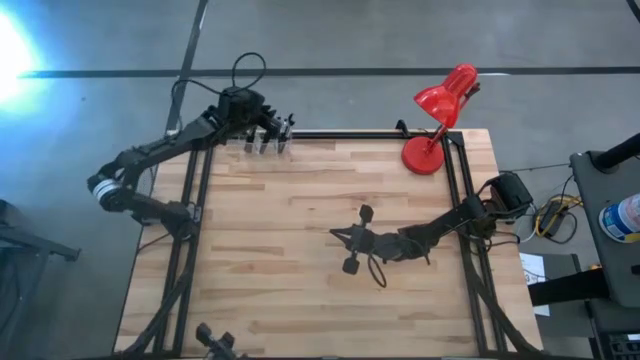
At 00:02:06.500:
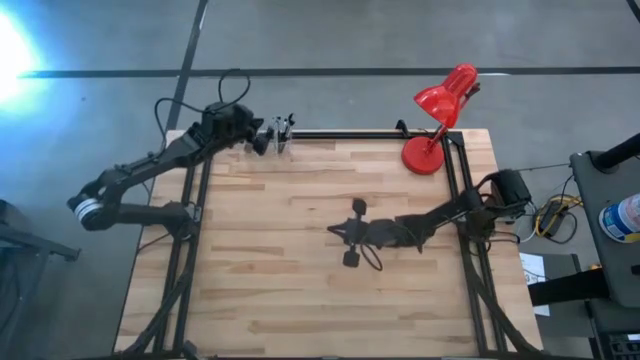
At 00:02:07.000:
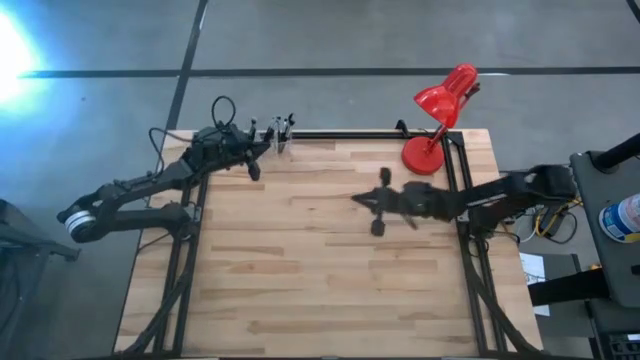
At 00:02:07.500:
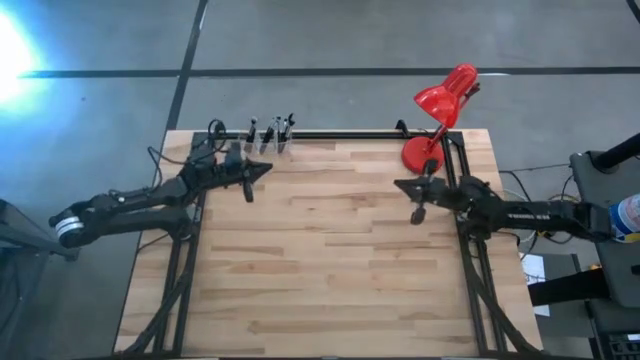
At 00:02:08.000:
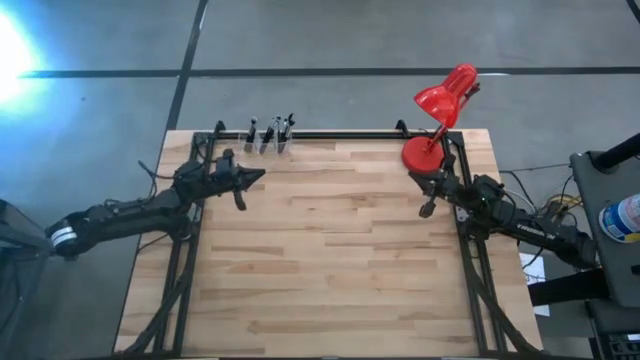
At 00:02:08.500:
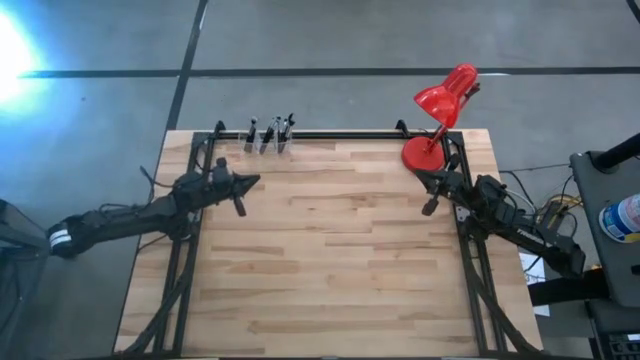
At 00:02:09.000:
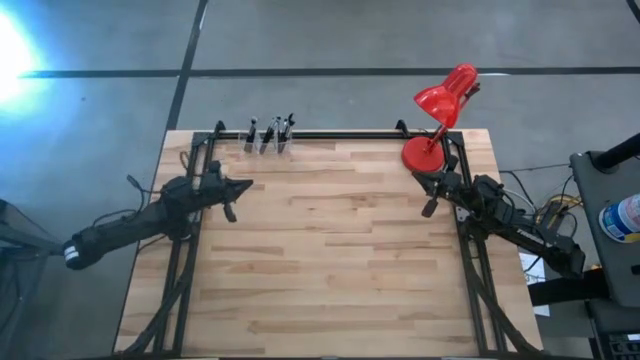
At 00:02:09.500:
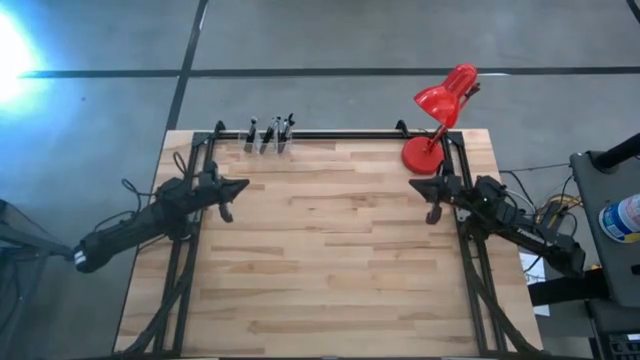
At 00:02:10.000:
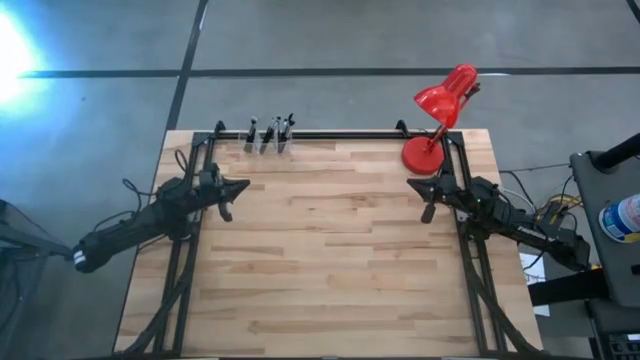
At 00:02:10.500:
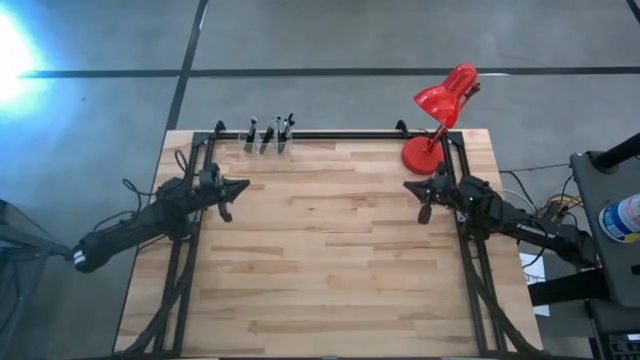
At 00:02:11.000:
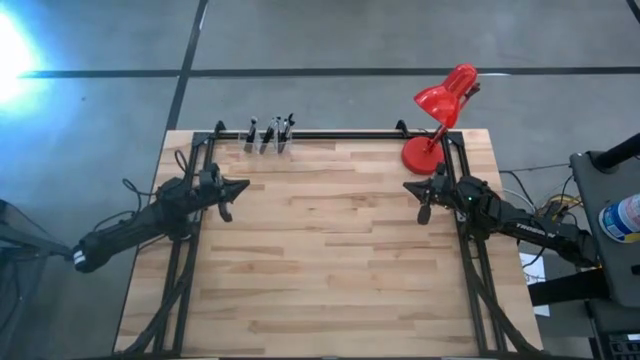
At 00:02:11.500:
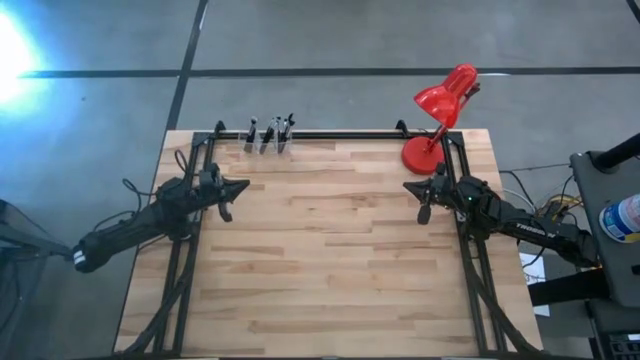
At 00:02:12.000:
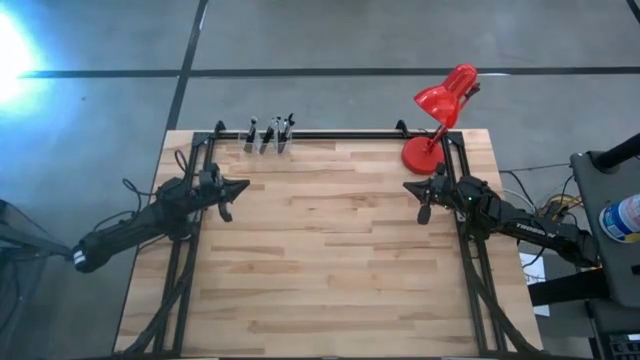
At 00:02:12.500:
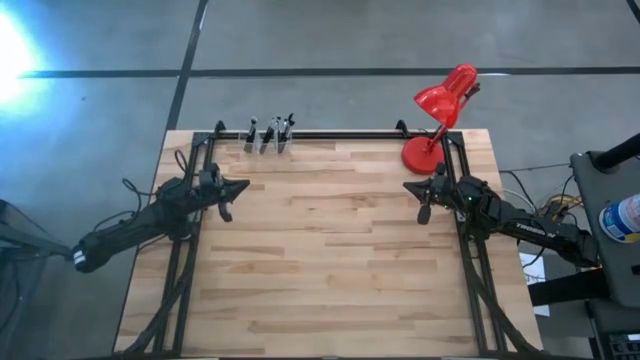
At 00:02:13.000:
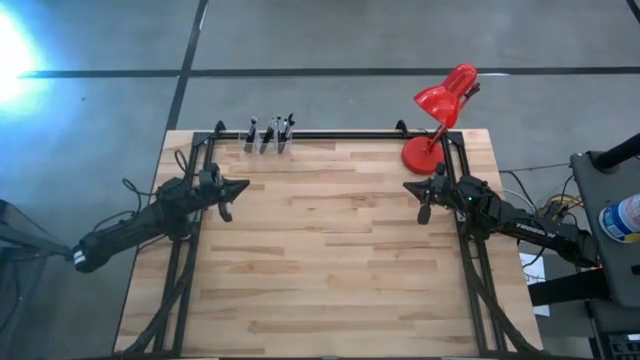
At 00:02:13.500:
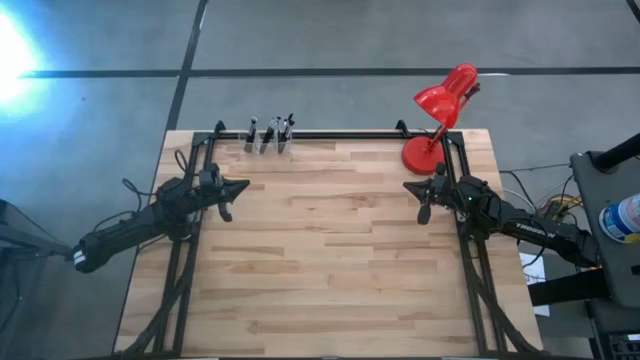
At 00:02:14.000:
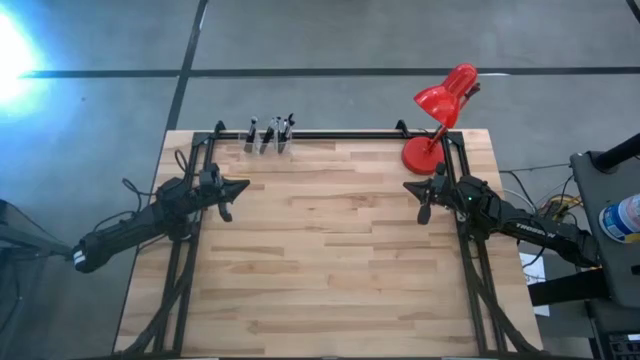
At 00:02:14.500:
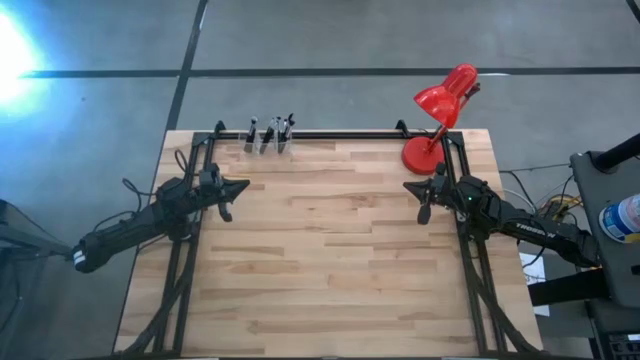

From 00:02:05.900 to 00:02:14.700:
Task: Put items in baskets/containers
Return to Home Position

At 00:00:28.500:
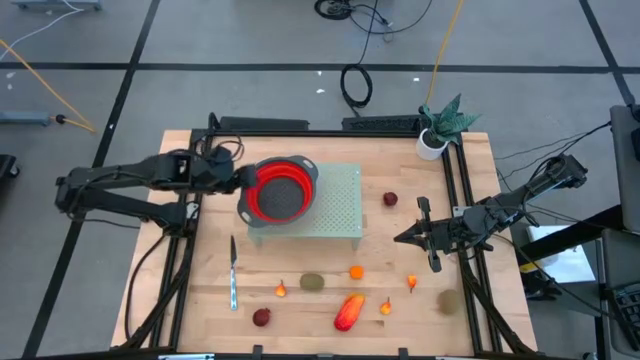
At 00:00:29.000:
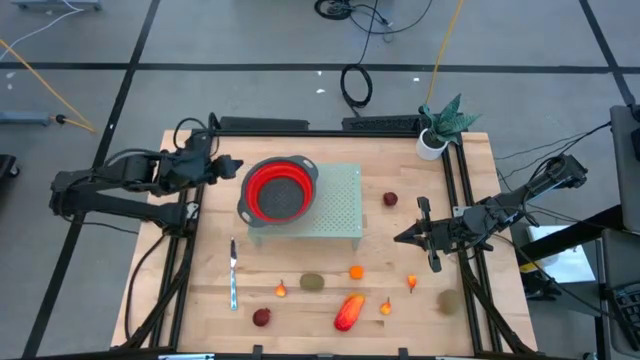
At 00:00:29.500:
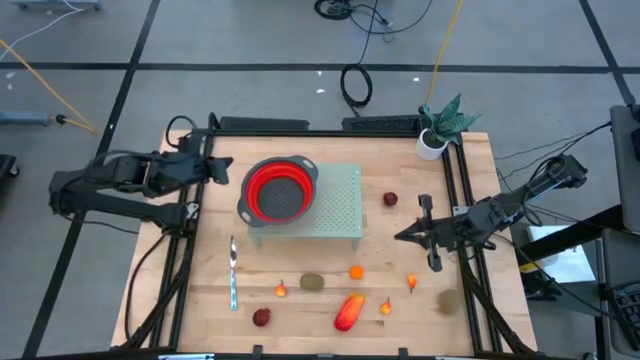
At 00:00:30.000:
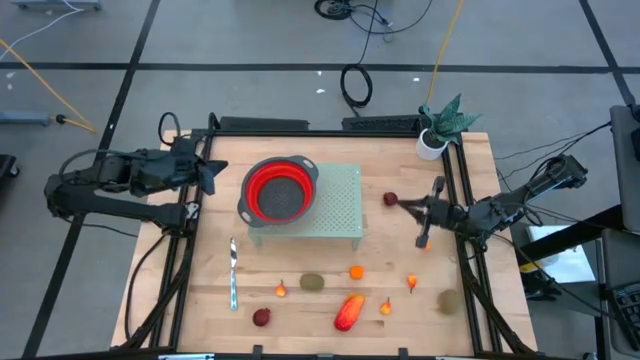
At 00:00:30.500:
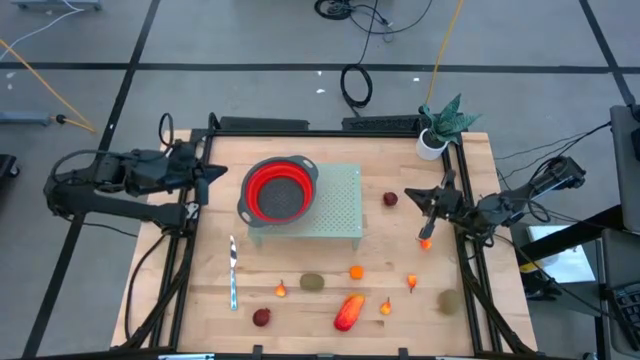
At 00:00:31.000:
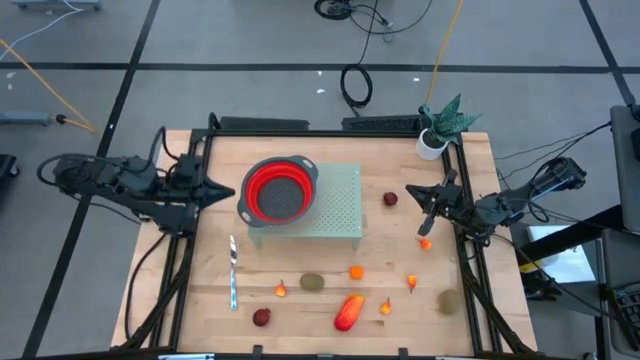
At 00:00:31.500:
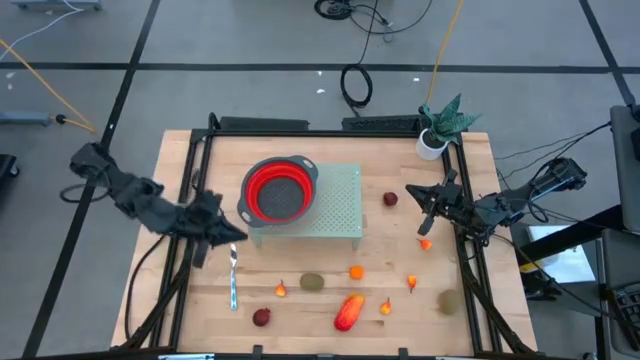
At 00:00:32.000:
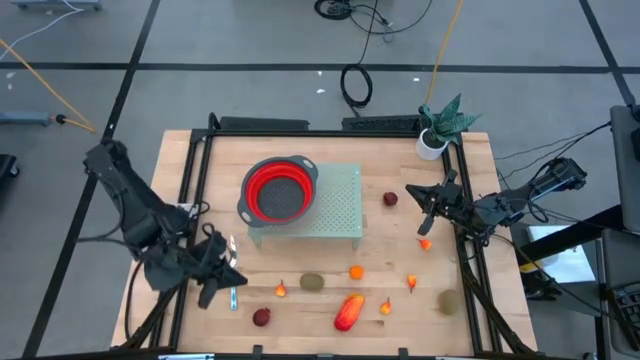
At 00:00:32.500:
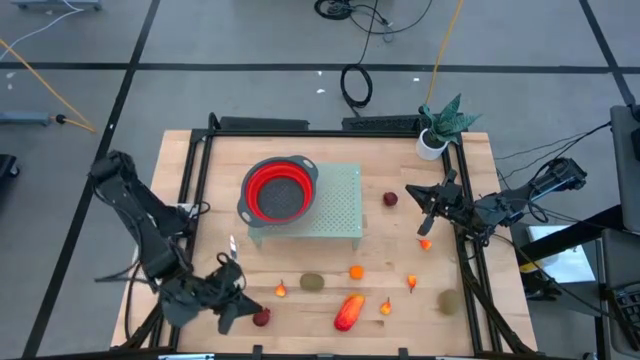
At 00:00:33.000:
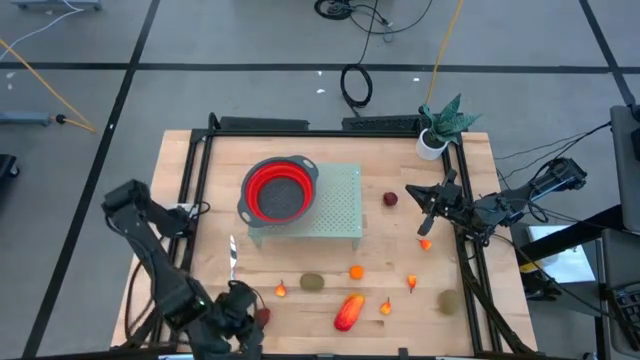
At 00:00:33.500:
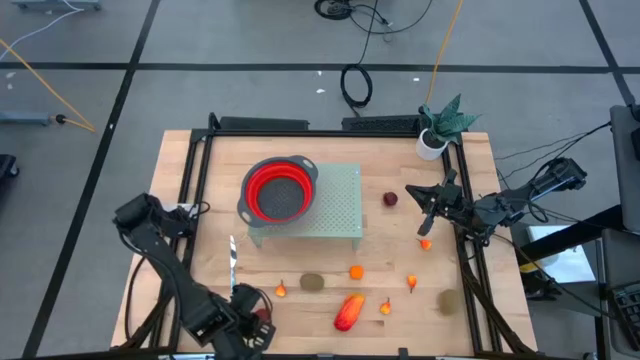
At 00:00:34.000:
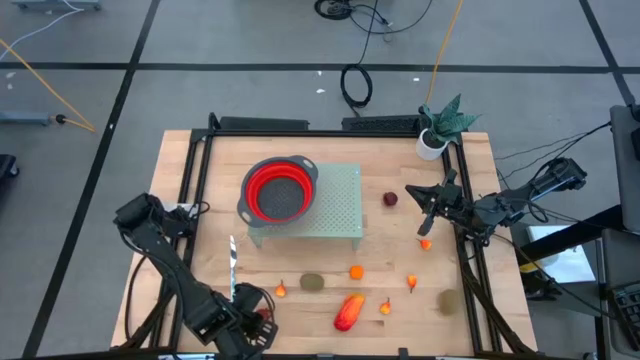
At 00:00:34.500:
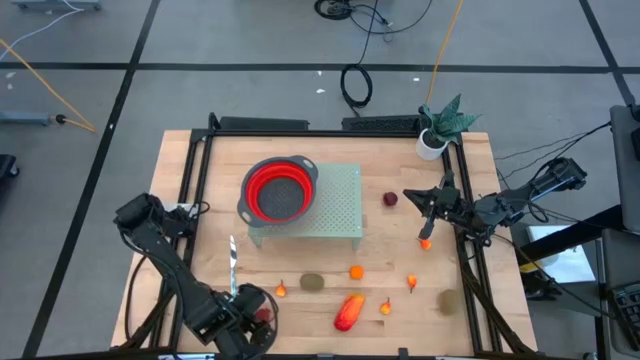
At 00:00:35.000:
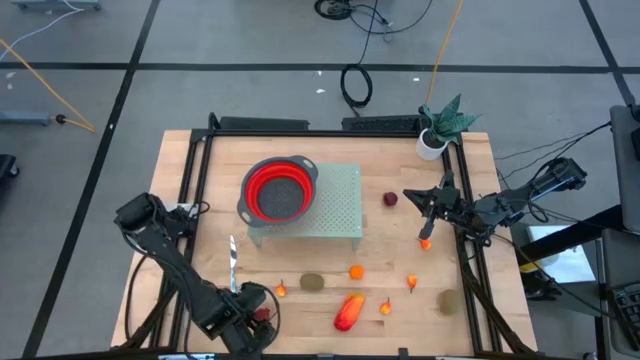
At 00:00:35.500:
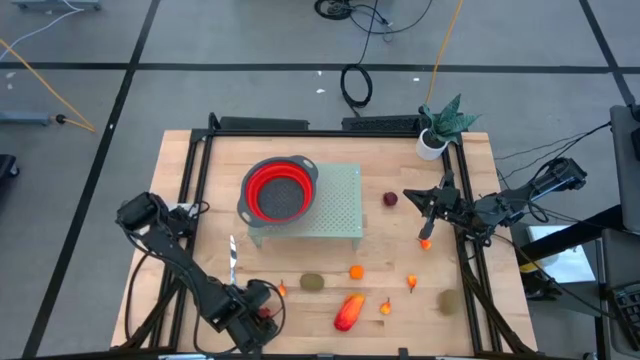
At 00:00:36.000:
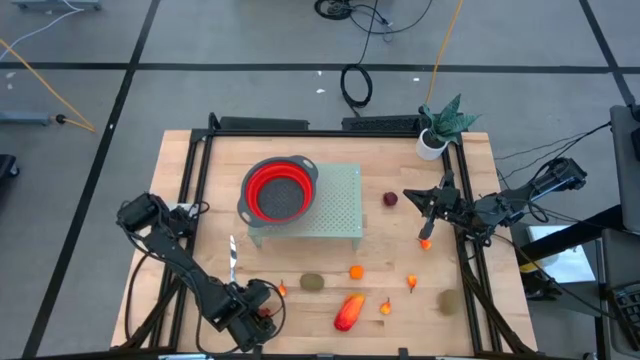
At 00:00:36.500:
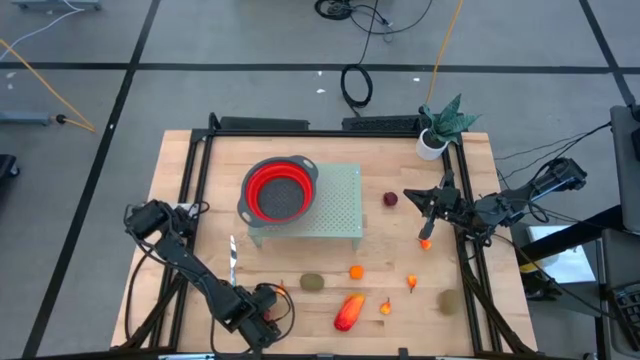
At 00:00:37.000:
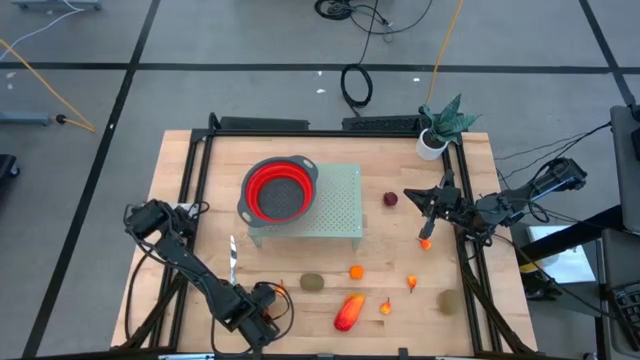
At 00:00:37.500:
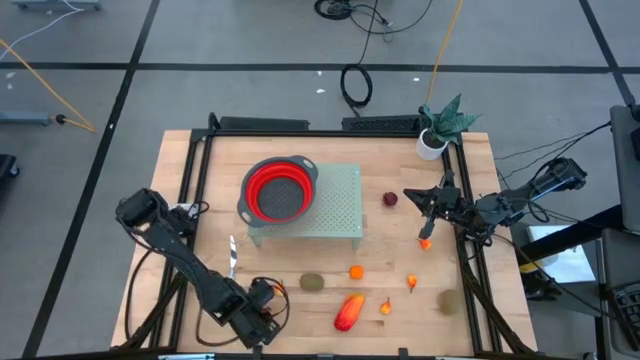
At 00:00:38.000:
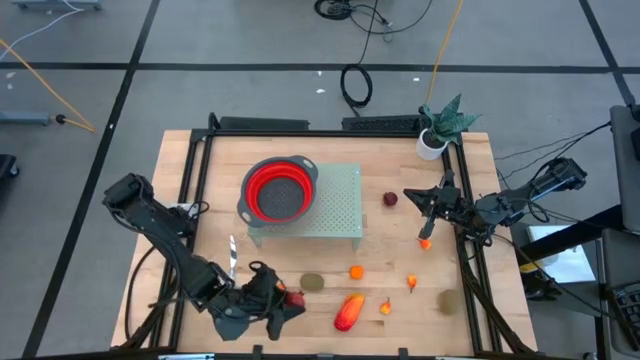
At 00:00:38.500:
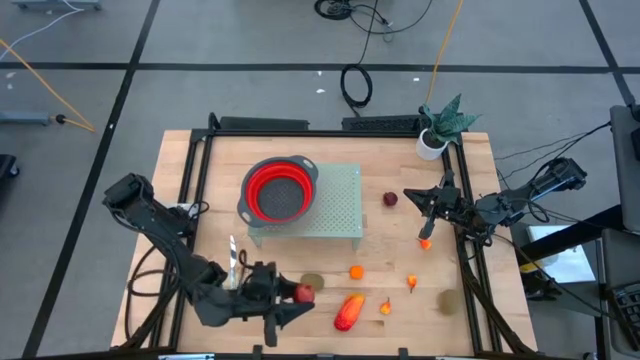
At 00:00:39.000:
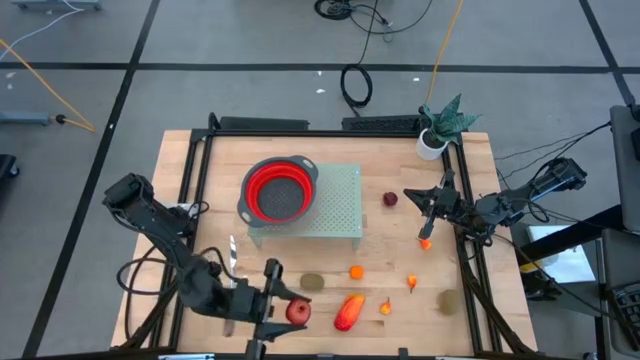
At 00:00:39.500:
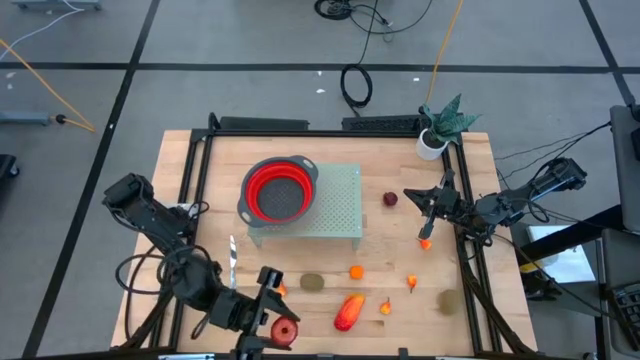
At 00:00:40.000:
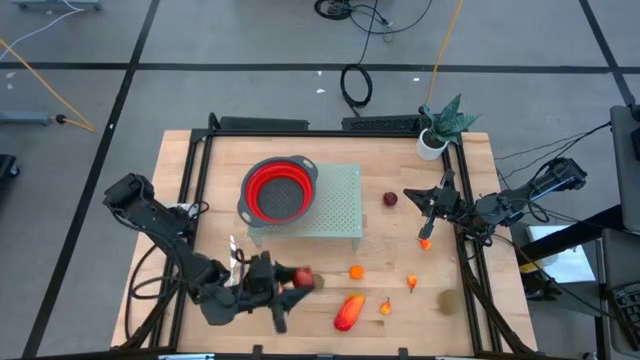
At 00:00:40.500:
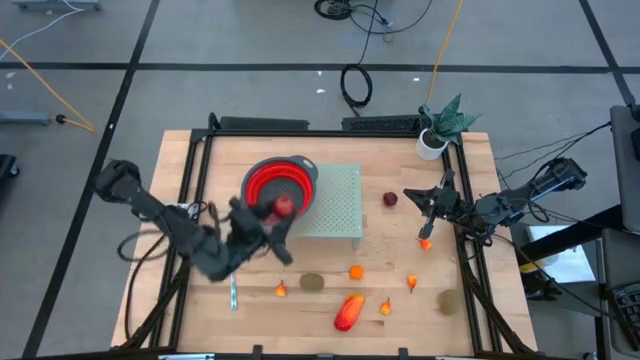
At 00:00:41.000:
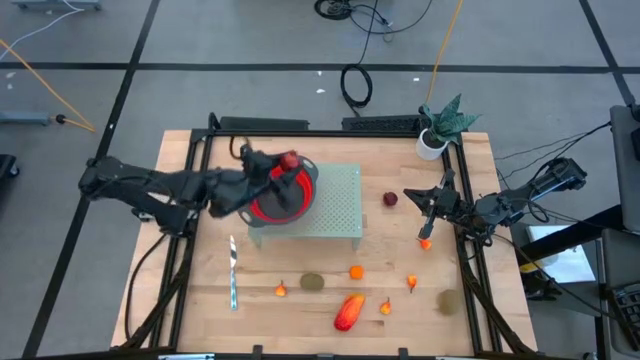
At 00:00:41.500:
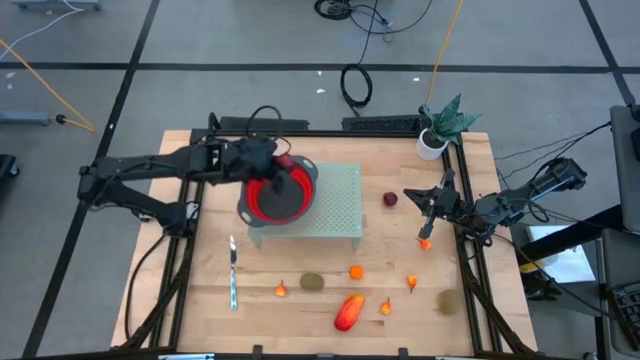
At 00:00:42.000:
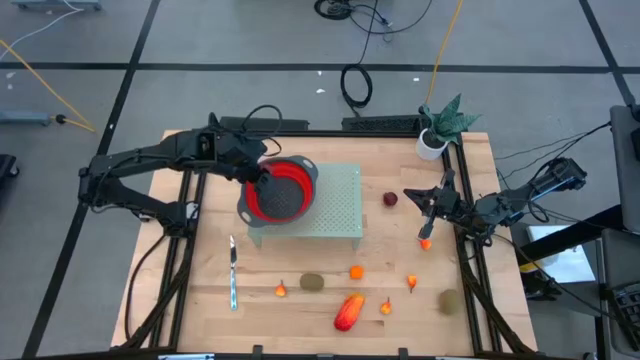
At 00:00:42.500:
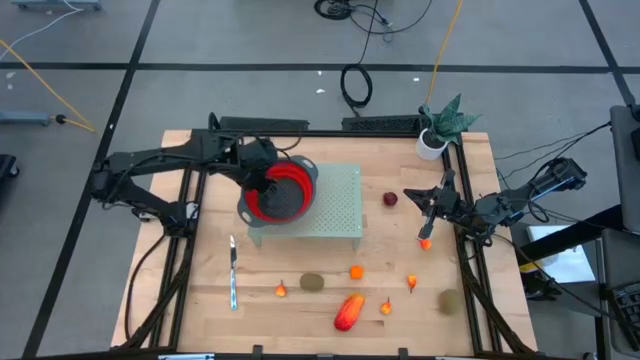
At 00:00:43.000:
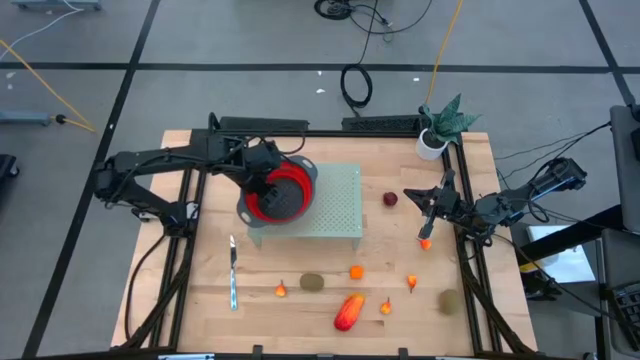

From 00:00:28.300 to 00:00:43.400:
Task: Pick & Place Fruit
Put the bottom pomegranate into the strainer bowl on the shelf
